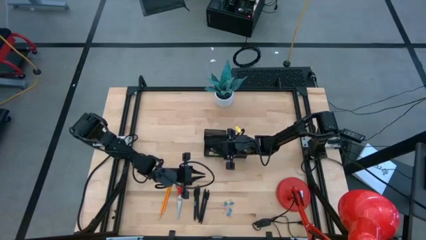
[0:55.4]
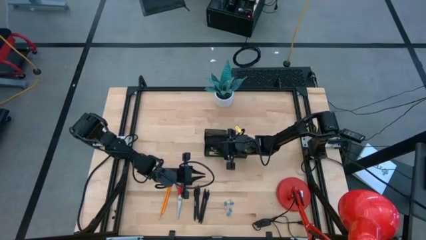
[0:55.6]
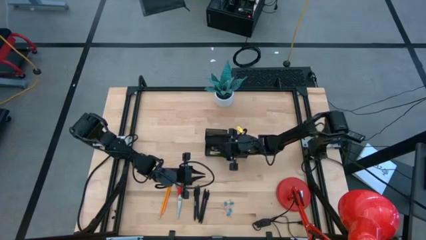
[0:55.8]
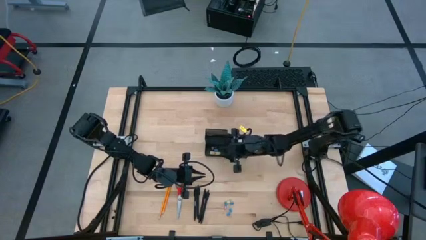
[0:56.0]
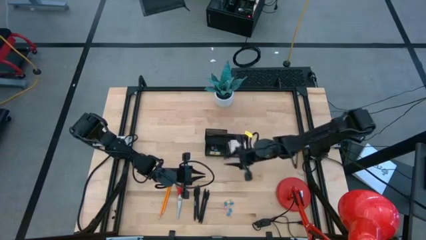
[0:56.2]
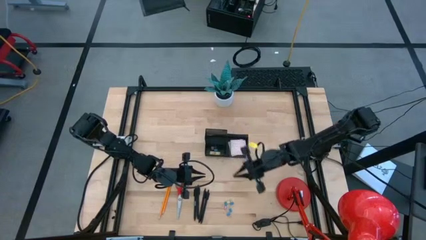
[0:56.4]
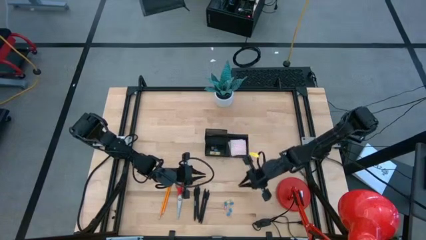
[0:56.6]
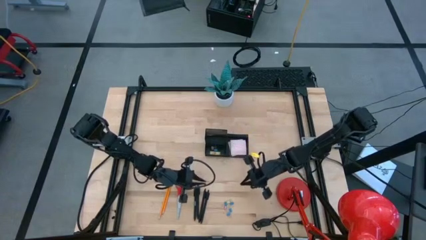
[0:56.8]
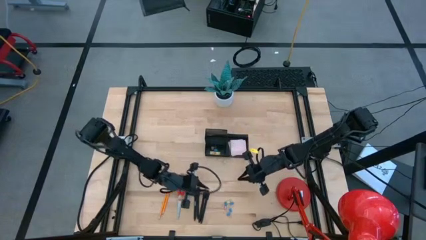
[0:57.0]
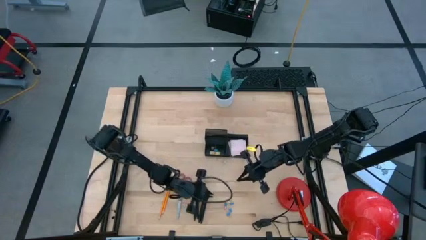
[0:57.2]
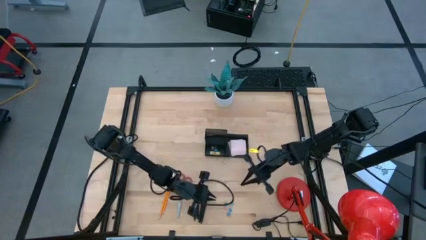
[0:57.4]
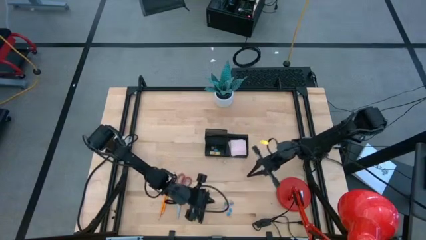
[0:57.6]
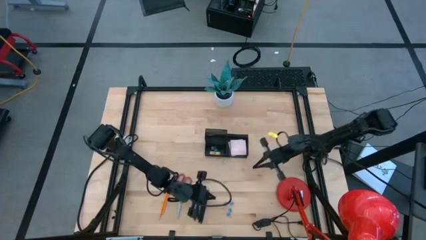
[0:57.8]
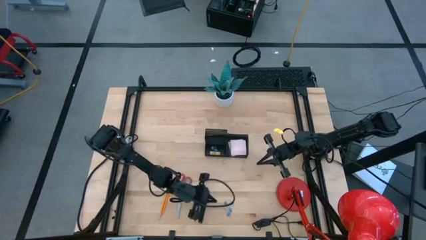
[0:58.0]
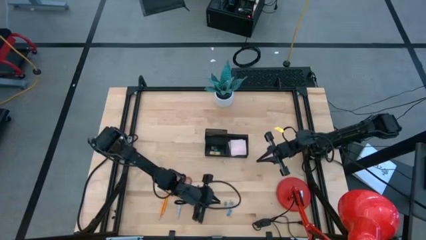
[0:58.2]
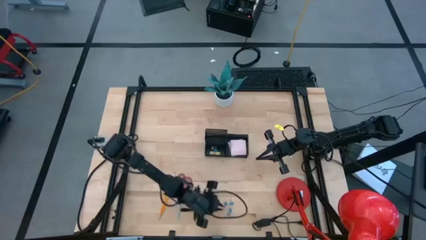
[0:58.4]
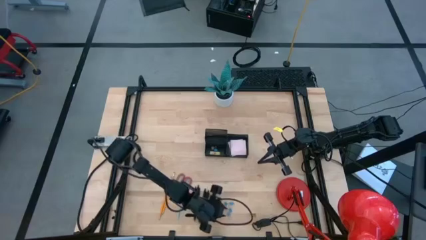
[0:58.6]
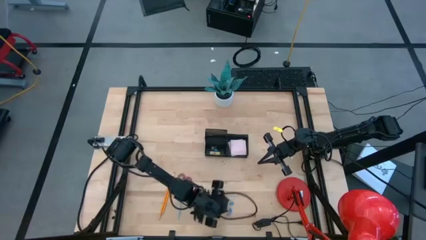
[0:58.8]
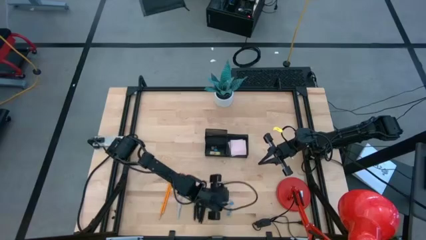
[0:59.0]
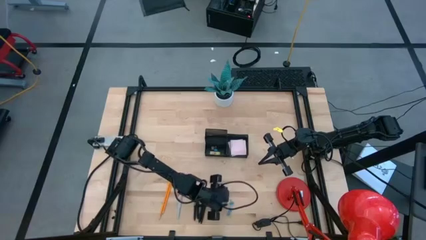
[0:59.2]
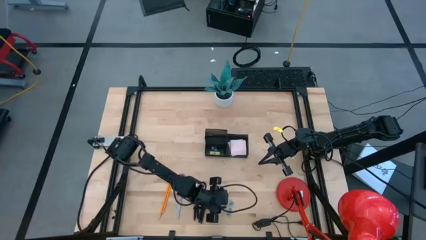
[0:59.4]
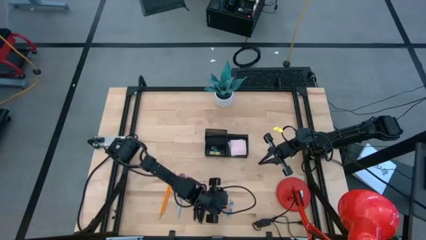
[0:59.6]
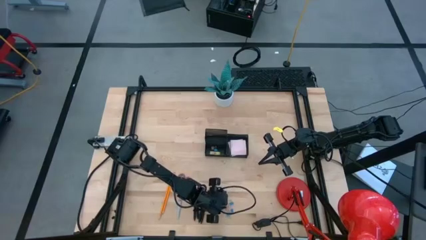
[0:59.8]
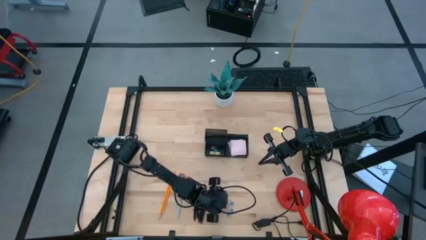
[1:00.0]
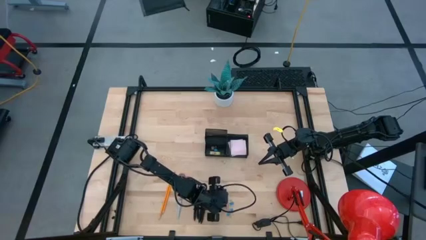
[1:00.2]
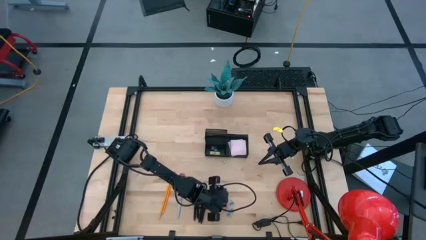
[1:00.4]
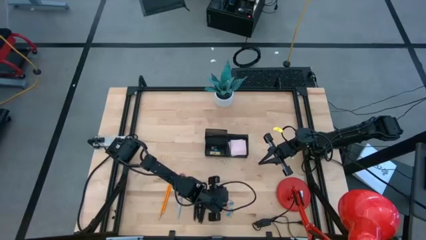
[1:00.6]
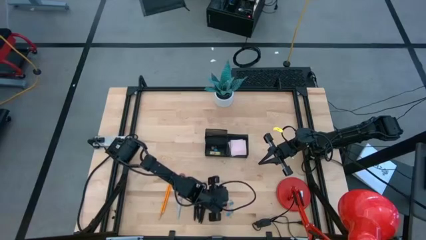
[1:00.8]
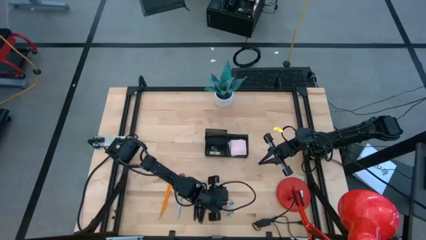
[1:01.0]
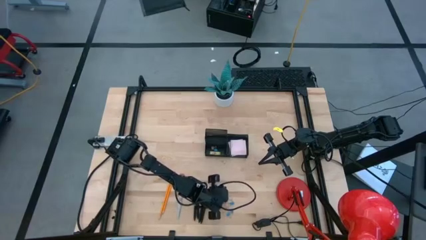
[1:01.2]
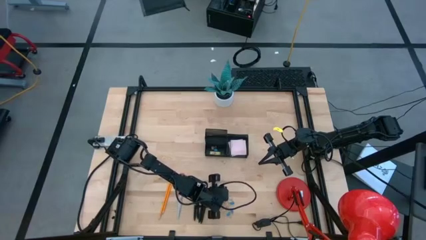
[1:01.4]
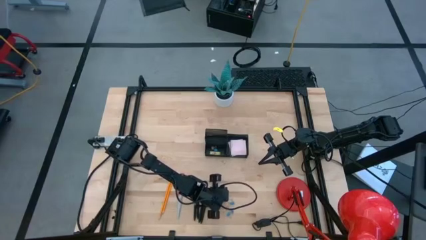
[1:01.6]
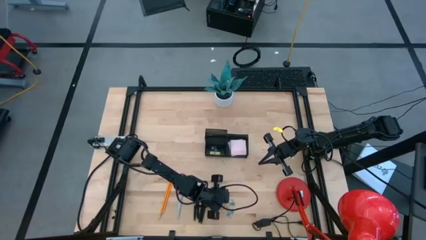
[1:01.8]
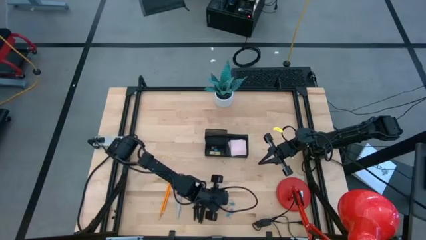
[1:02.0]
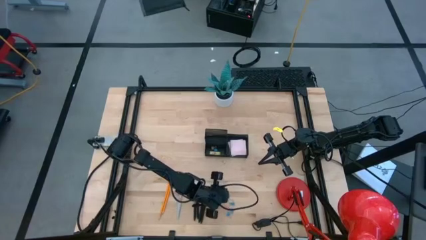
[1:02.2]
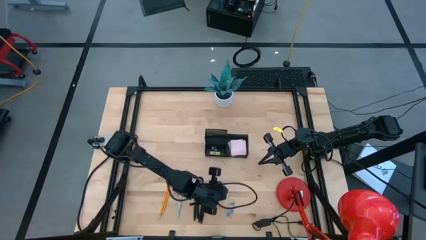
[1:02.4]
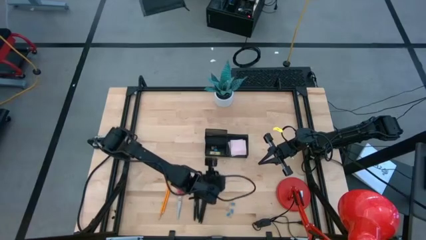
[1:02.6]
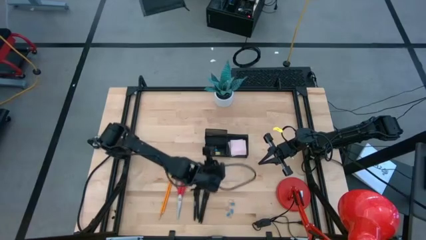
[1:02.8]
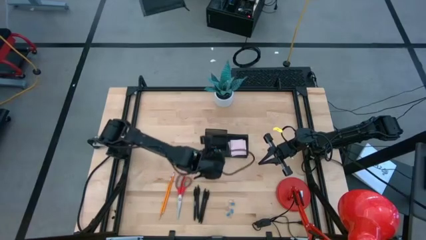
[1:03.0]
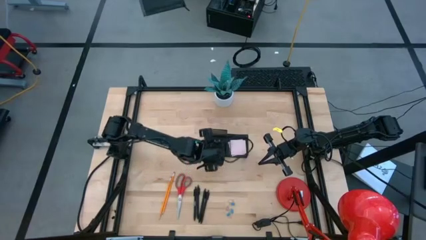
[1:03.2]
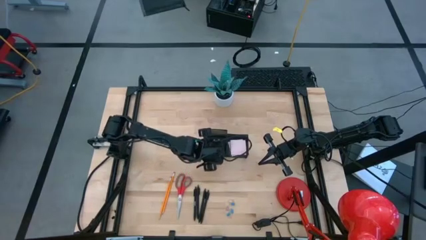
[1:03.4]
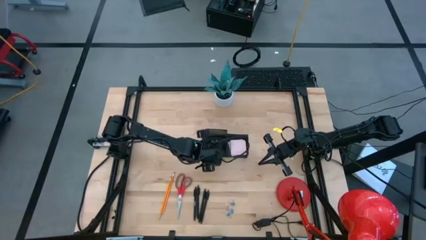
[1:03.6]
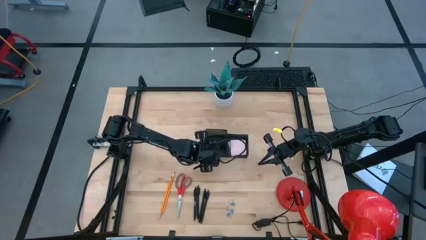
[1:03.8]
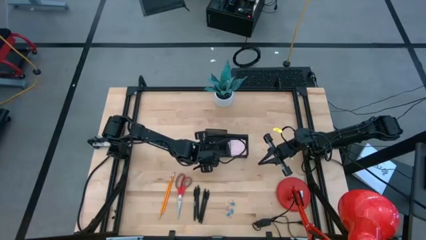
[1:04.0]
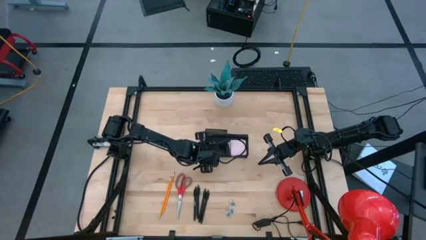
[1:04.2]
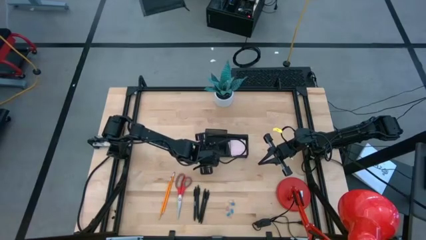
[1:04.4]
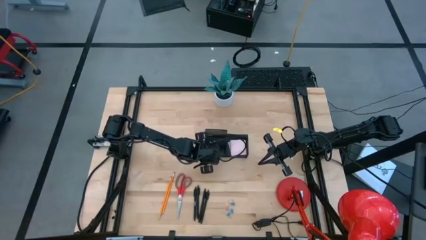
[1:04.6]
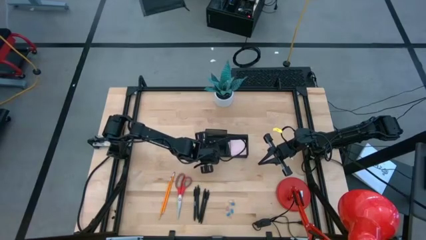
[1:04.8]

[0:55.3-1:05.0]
Task: Pick and place office supplies into organizer
Put the blue binder clip into the black desk organizer

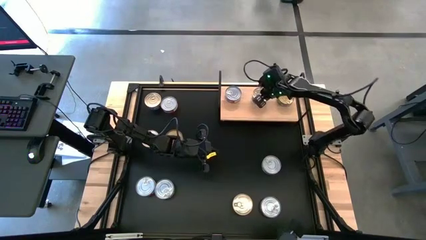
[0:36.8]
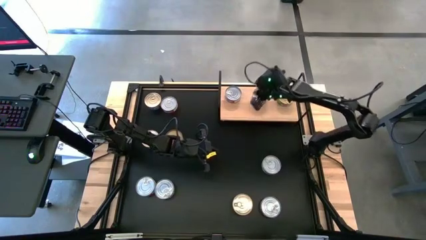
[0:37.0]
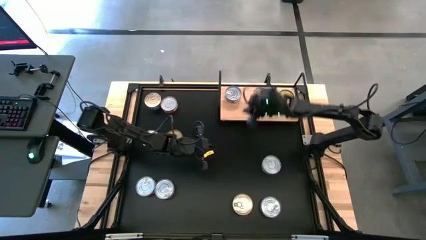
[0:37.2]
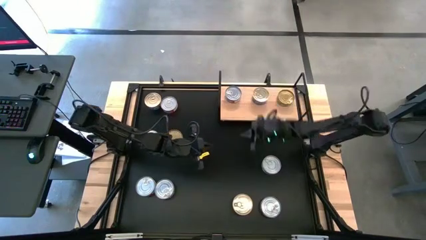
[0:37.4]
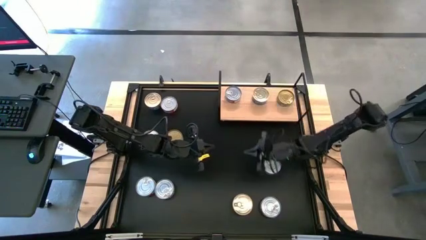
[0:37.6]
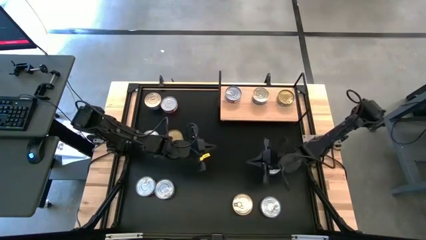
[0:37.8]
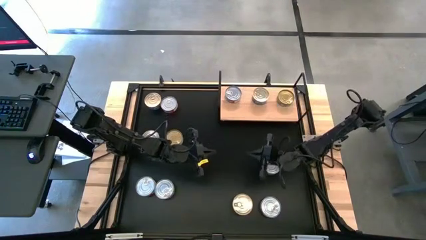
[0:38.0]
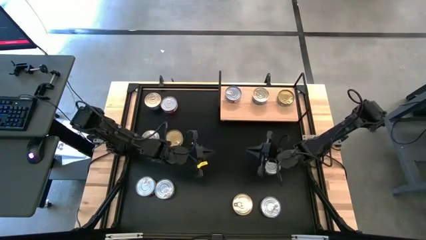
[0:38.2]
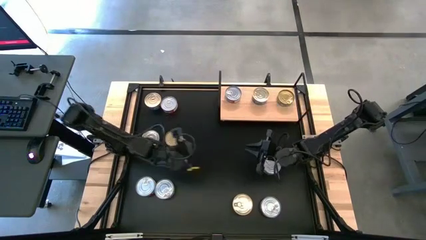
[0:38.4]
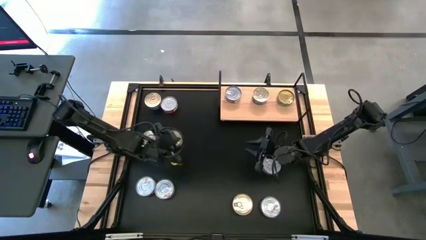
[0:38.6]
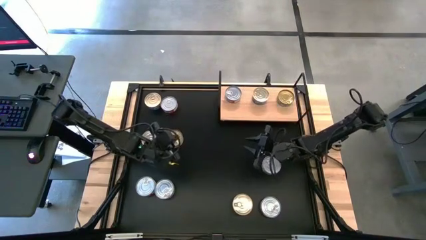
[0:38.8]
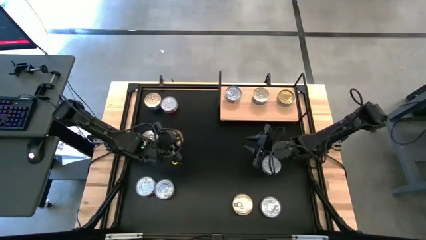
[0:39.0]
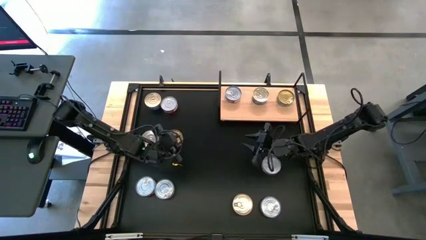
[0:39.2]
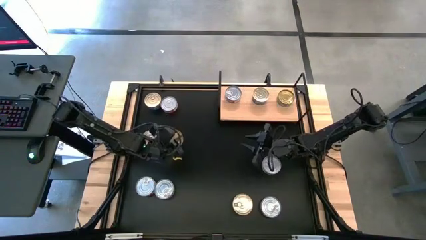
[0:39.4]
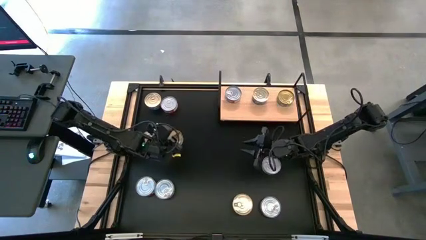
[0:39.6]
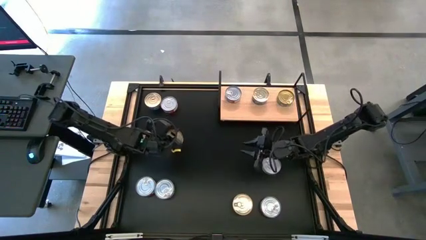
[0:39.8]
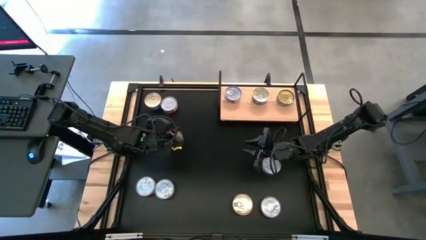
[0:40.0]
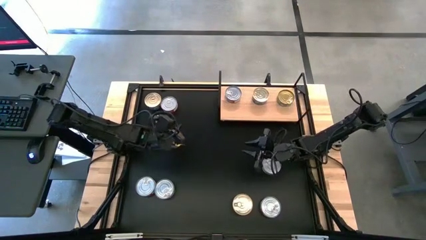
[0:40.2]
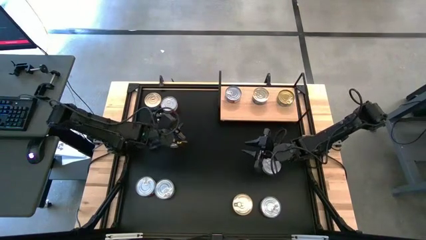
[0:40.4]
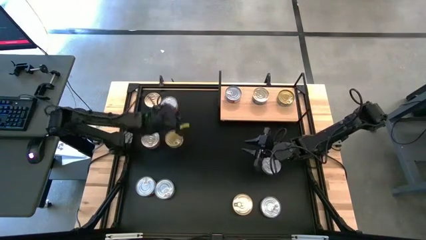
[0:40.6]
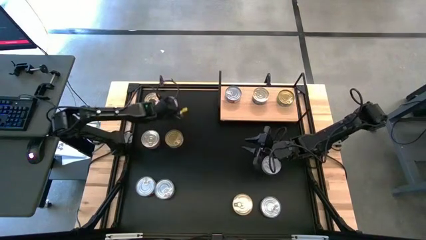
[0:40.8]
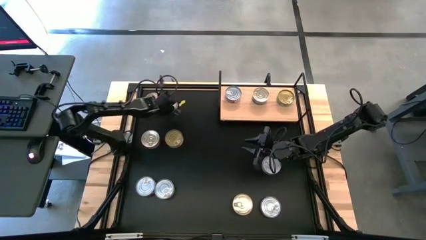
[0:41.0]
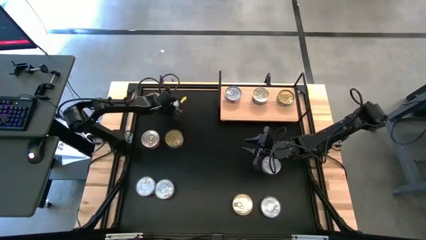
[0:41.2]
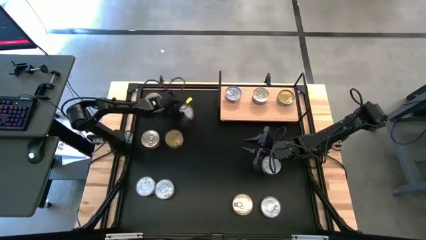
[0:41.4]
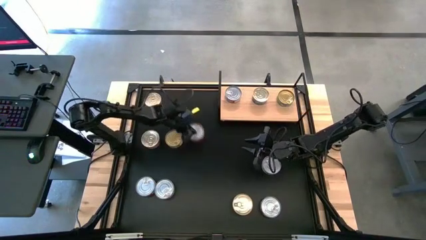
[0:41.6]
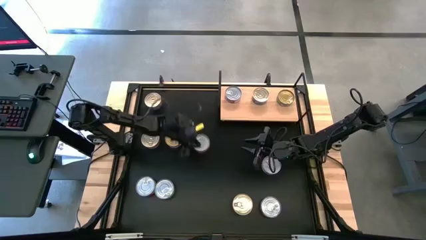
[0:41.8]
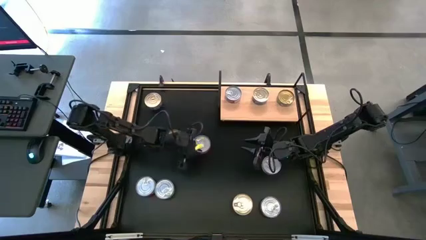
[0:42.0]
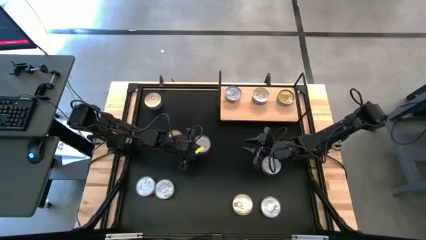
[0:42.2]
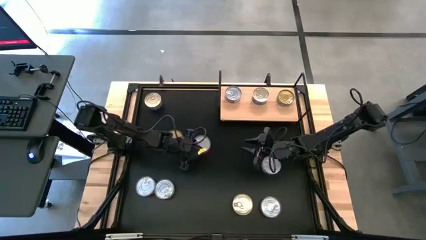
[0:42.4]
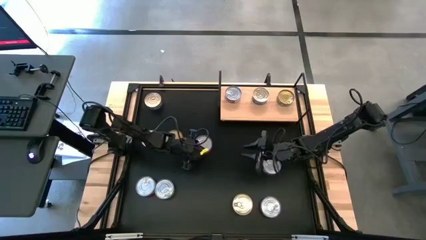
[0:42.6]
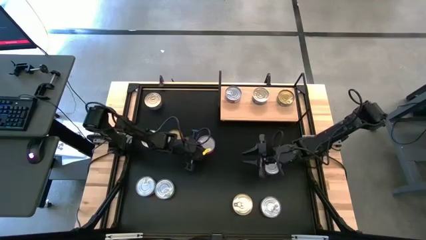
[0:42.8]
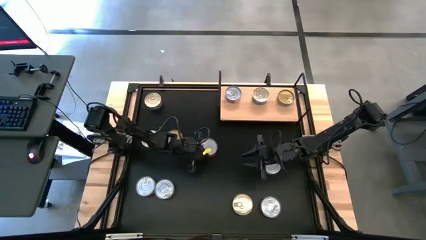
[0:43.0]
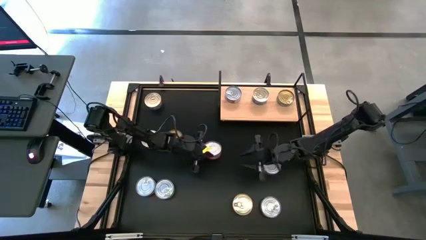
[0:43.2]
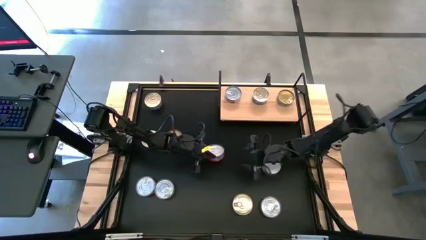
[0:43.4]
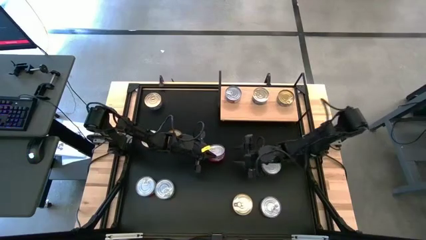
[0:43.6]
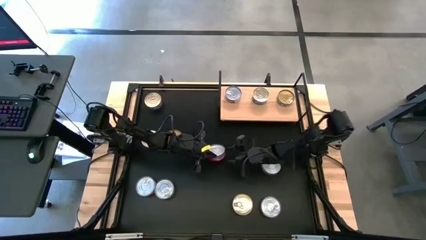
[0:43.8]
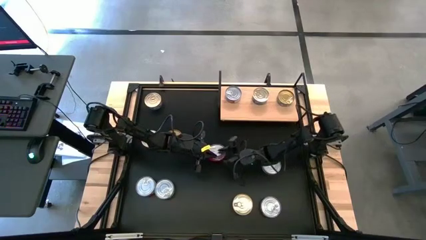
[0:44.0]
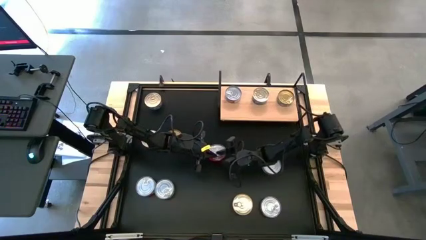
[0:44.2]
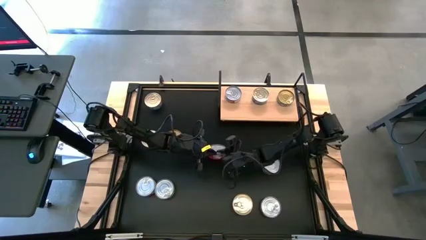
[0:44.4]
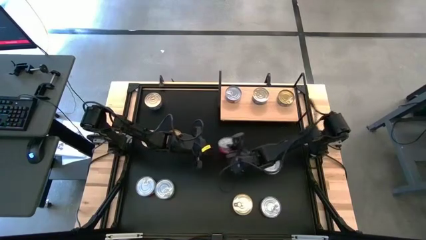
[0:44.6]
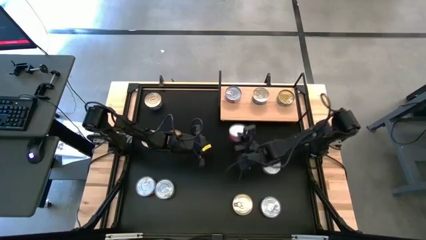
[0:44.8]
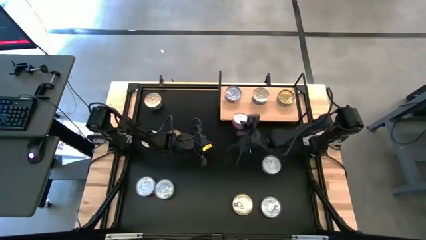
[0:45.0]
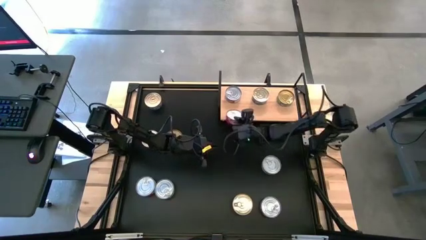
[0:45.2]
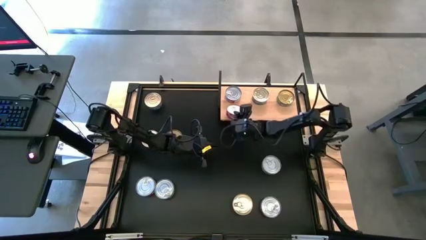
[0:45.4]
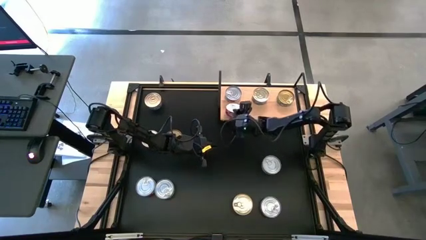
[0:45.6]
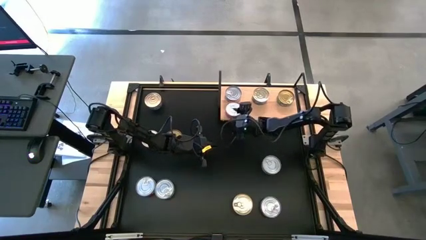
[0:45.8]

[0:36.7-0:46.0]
Task: Stack canned seafood by type on shelf
Put the red tuna can on the shelf
